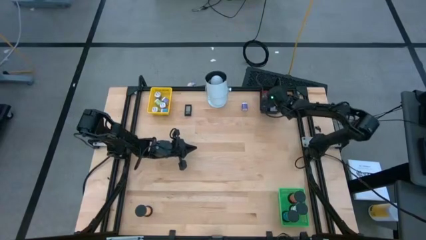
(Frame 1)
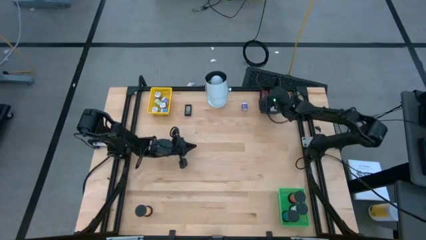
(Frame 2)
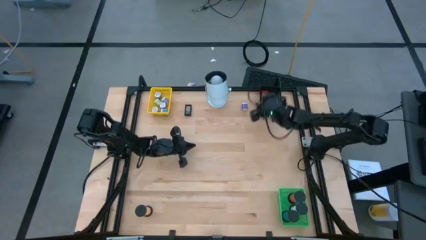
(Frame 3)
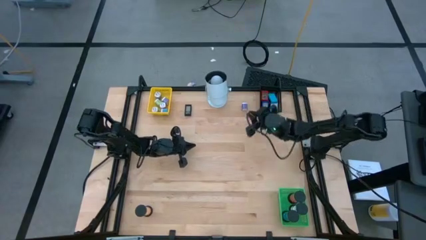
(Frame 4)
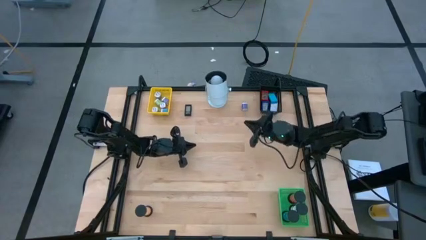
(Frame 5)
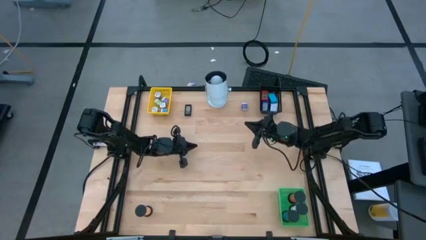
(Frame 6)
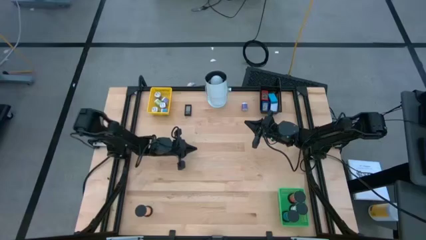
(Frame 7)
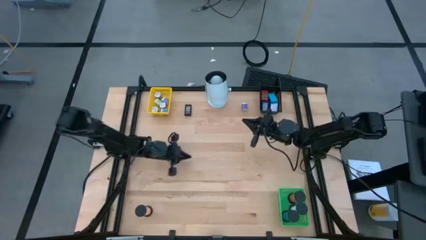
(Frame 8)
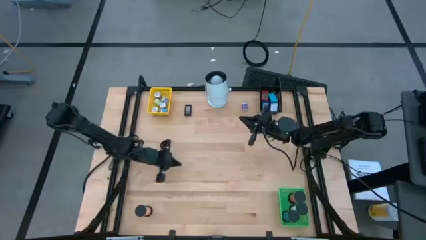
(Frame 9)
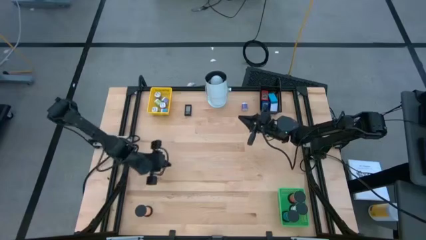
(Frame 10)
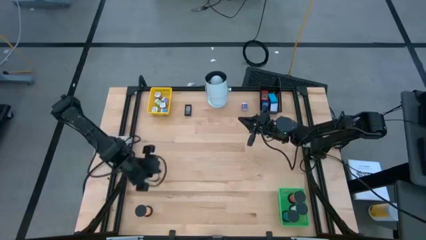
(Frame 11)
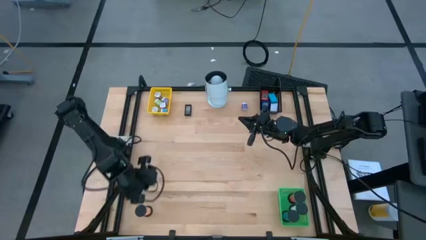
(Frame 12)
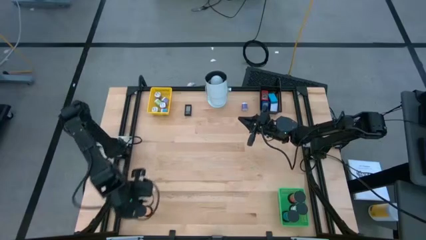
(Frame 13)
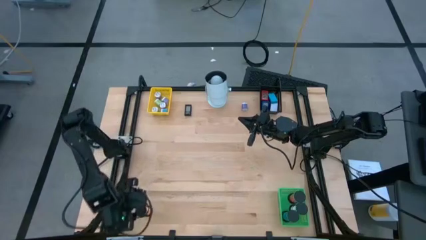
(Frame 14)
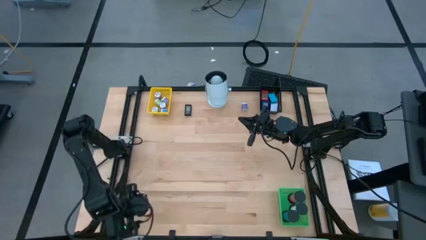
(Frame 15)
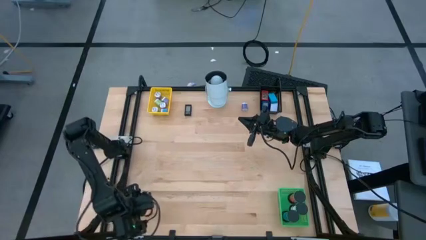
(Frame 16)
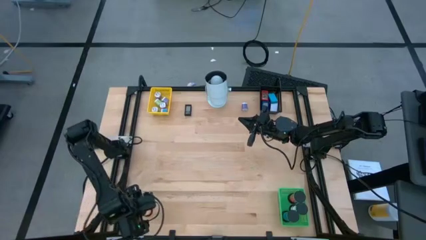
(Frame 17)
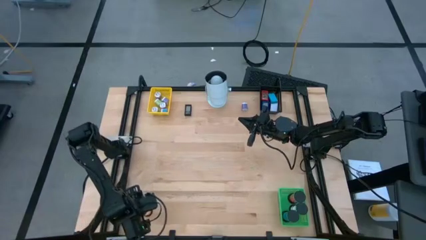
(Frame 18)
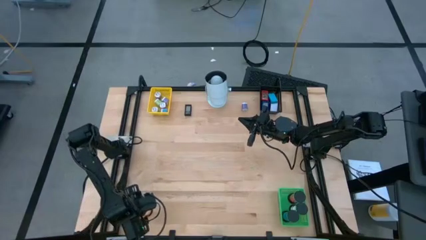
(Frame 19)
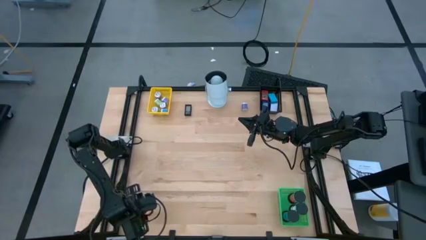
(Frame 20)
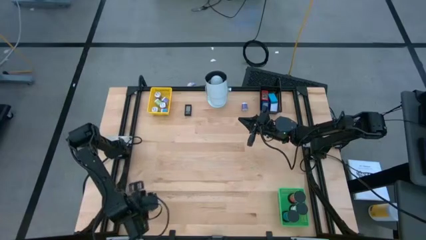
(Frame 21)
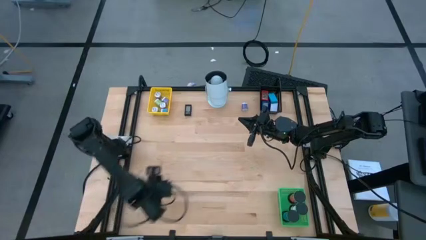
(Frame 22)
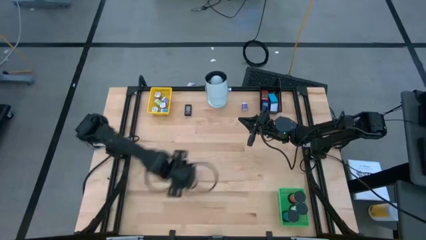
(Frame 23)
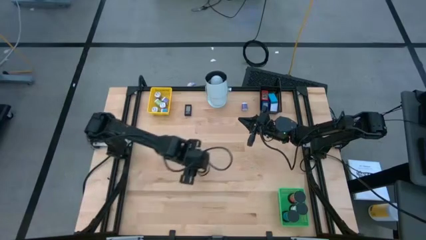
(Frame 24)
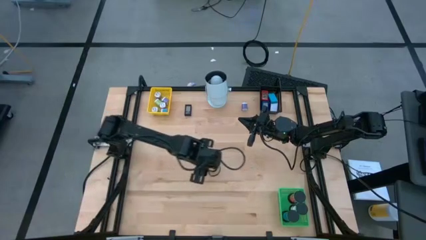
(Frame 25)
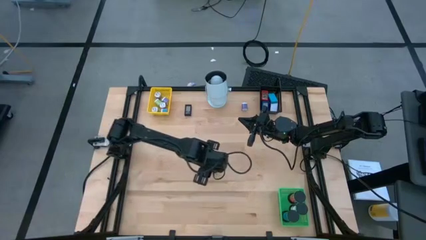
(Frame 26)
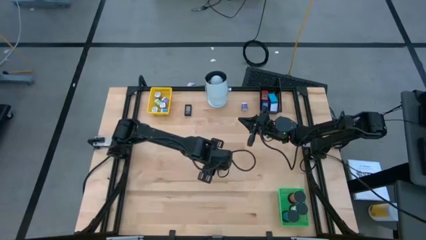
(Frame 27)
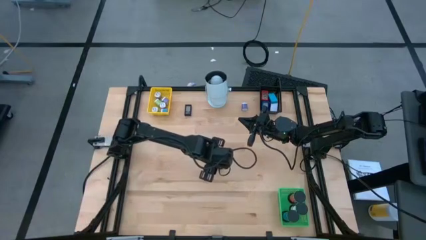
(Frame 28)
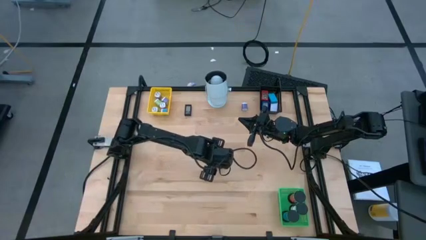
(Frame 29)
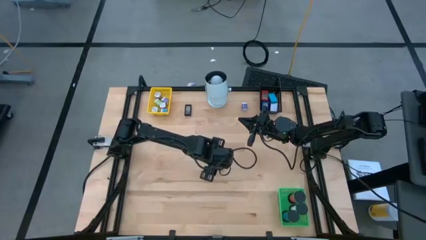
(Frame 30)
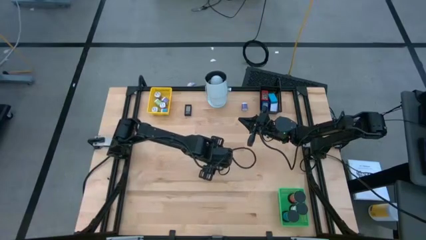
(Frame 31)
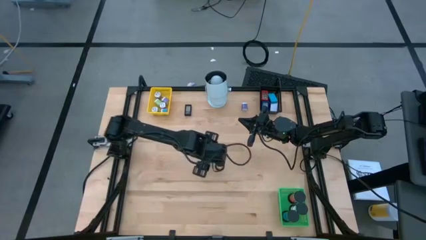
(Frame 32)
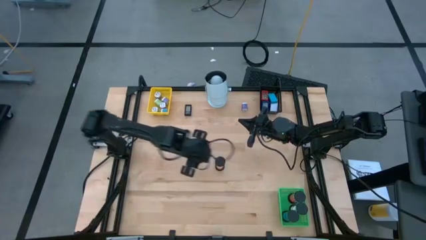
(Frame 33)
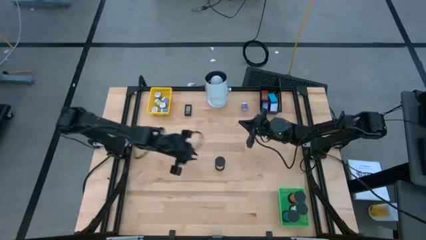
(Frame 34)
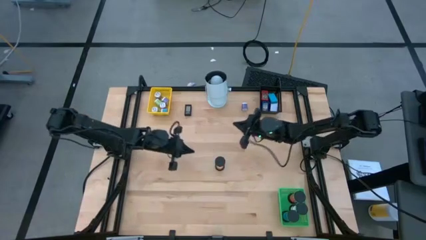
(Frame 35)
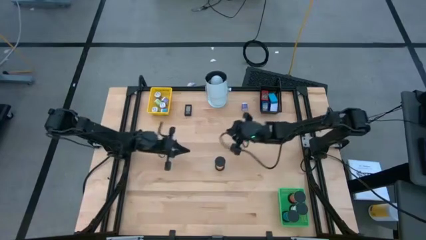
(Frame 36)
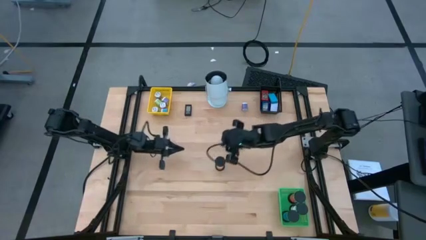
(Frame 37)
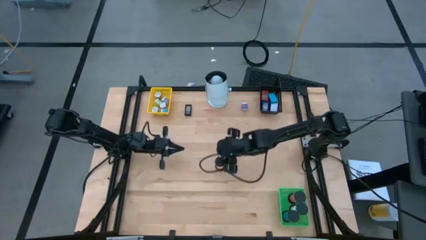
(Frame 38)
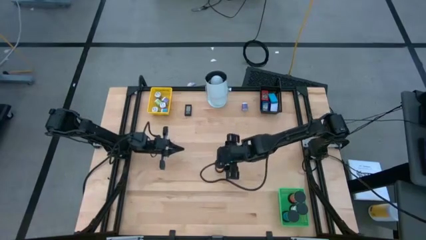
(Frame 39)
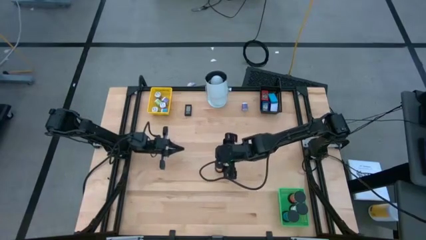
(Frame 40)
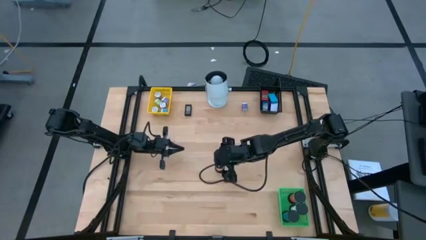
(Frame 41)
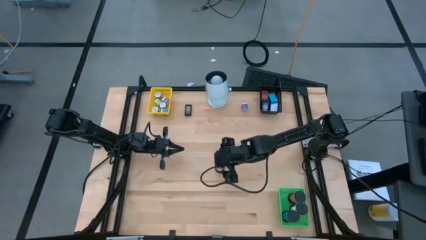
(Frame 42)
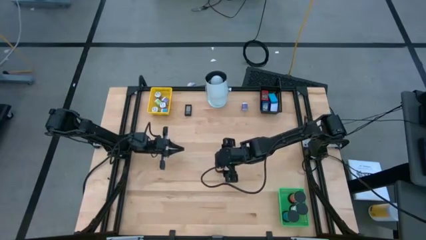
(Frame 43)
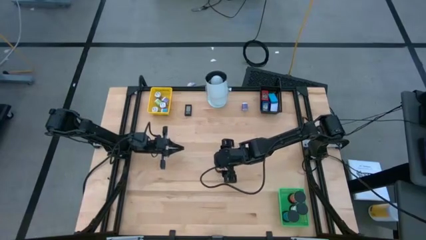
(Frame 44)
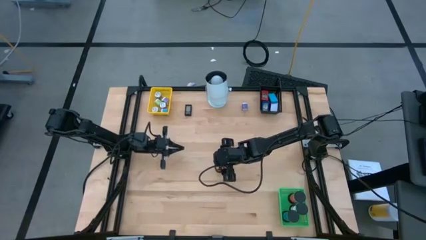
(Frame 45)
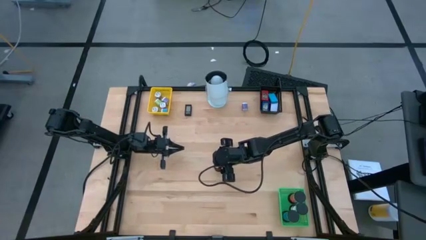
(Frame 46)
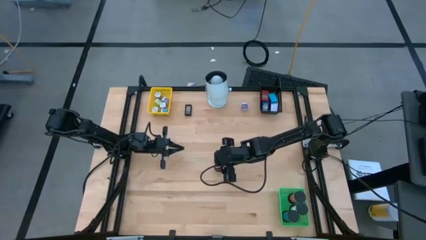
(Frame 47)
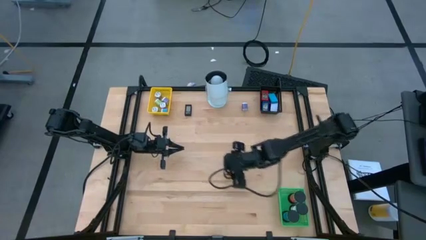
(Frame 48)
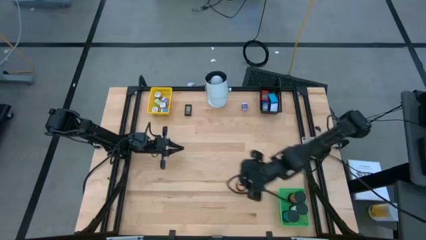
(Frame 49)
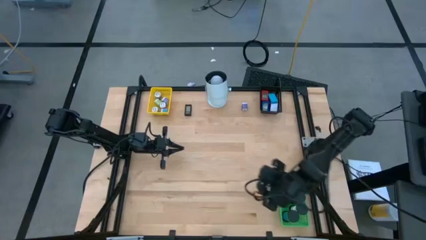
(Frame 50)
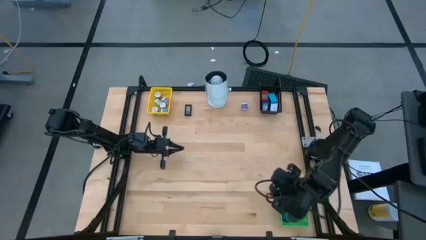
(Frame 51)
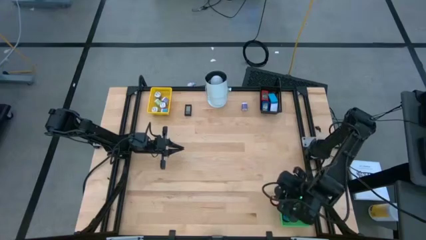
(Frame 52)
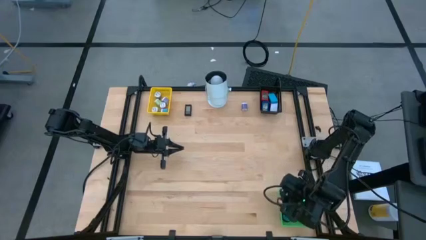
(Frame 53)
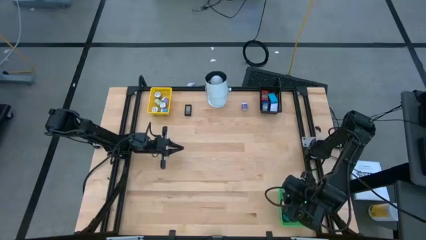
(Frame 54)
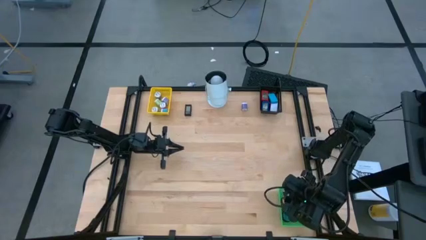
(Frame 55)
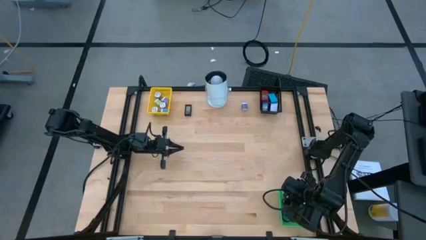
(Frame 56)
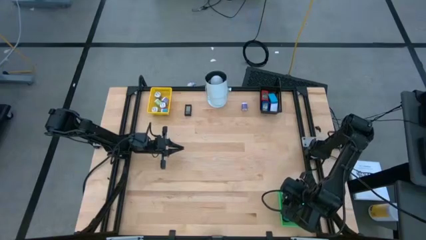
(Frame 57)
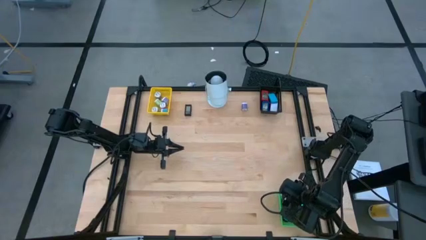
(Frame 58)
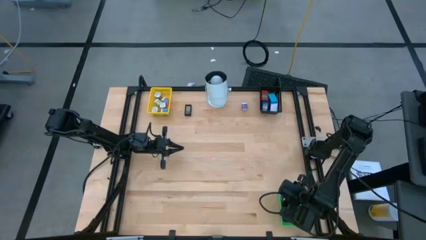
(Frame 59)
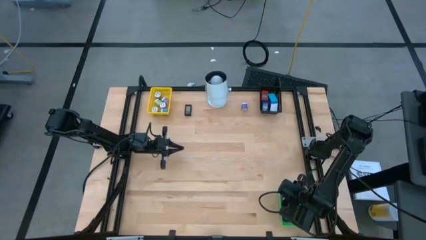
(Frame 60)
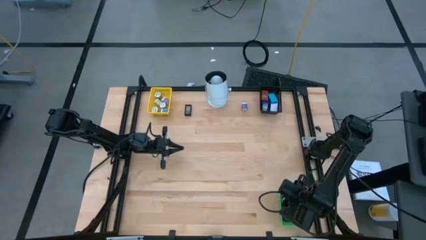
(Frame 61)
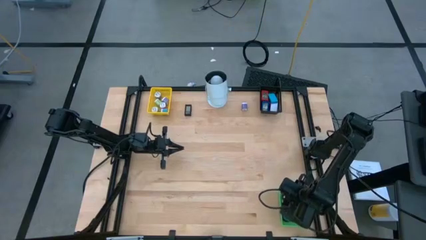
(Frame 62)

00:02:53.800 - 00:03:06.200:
Task: Pick & Place Office items
Put the orange hourglass into the green bin

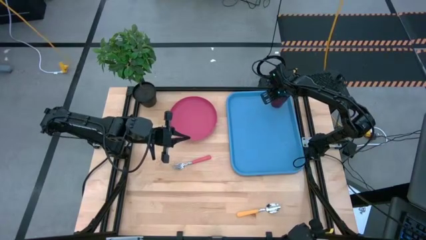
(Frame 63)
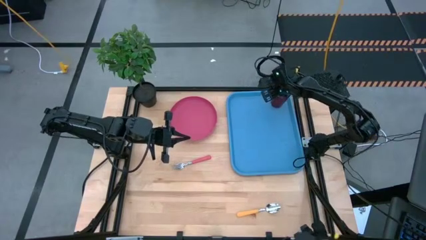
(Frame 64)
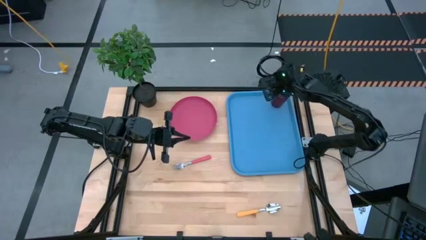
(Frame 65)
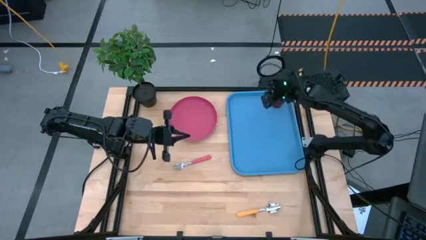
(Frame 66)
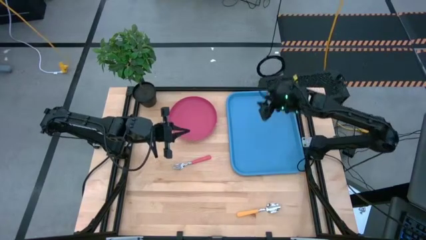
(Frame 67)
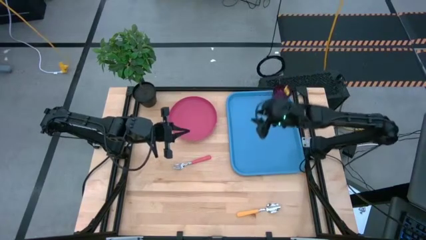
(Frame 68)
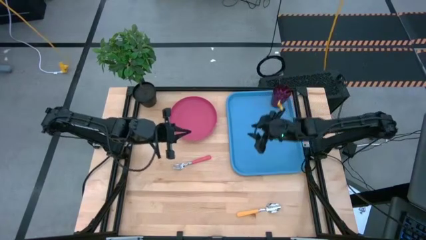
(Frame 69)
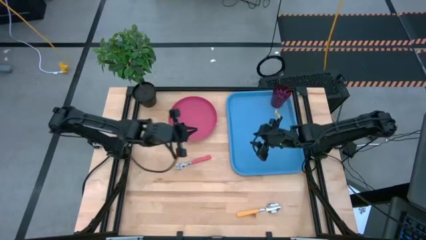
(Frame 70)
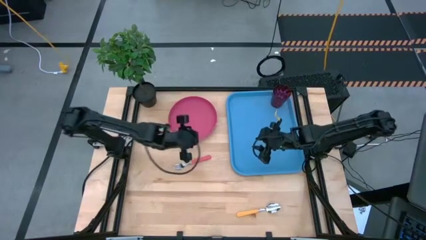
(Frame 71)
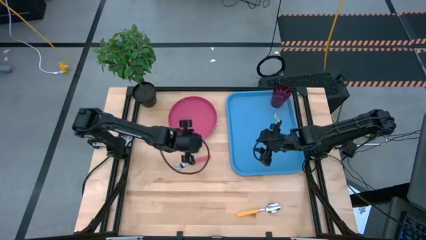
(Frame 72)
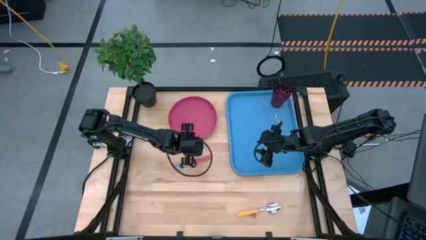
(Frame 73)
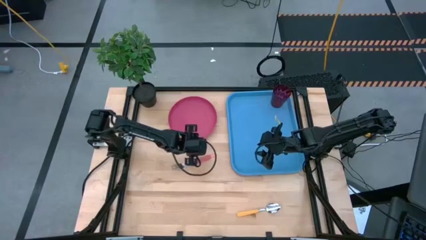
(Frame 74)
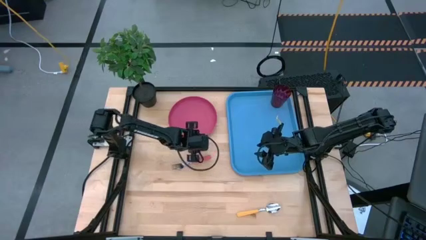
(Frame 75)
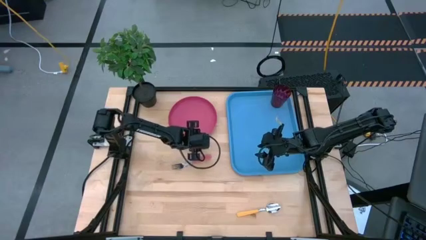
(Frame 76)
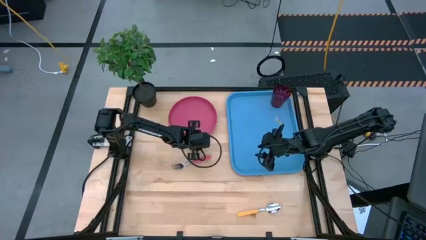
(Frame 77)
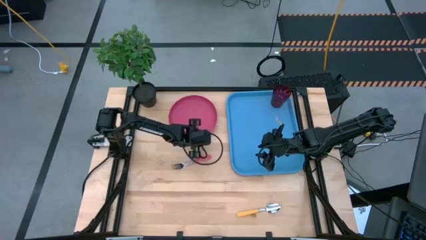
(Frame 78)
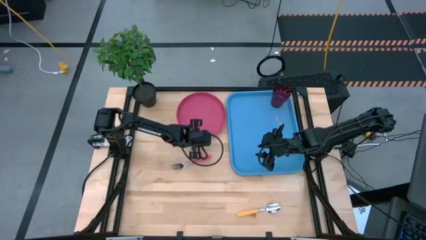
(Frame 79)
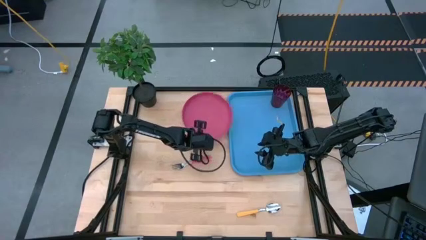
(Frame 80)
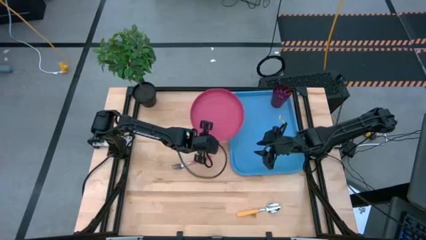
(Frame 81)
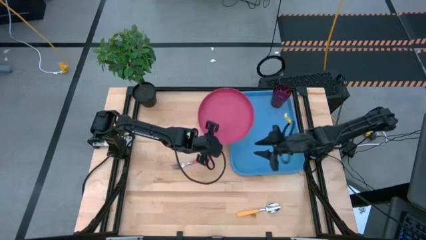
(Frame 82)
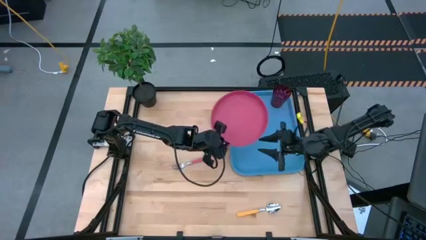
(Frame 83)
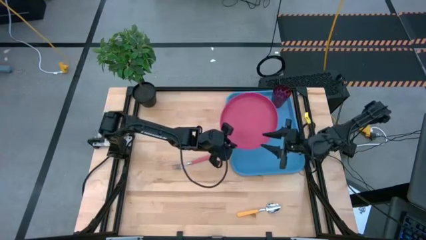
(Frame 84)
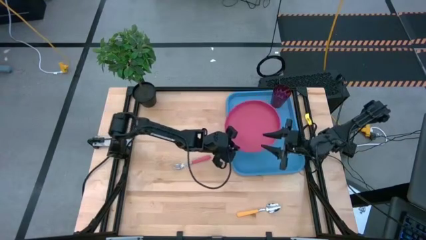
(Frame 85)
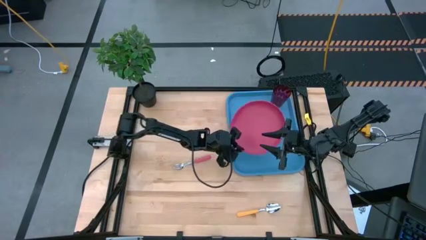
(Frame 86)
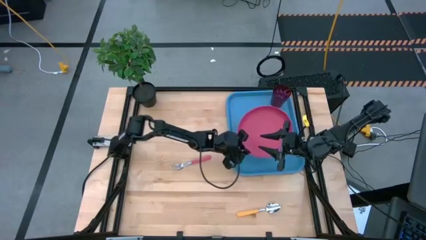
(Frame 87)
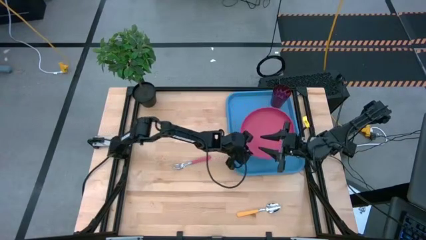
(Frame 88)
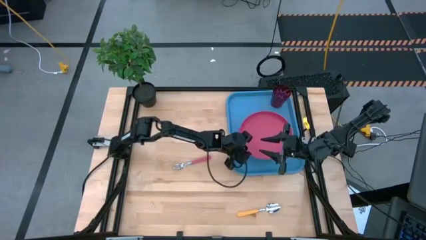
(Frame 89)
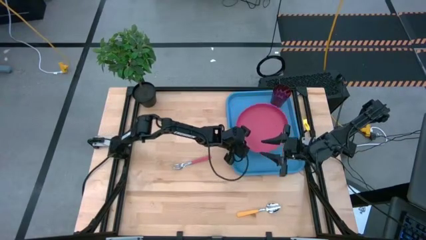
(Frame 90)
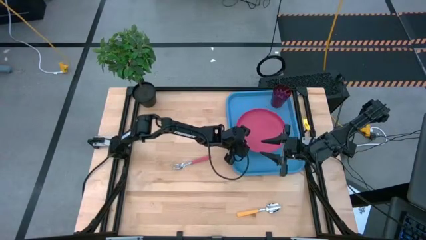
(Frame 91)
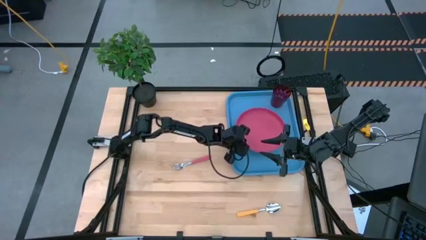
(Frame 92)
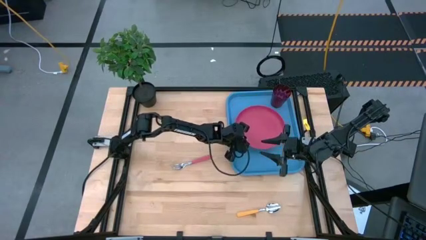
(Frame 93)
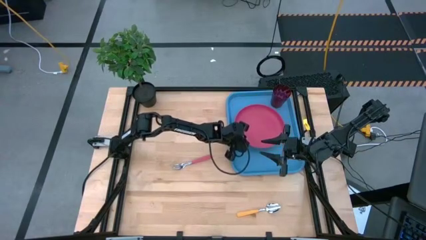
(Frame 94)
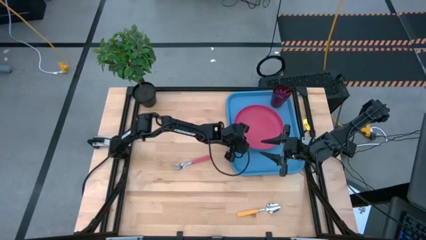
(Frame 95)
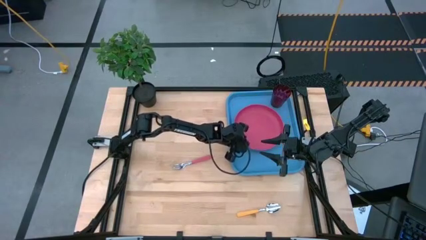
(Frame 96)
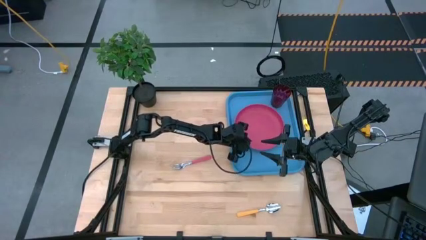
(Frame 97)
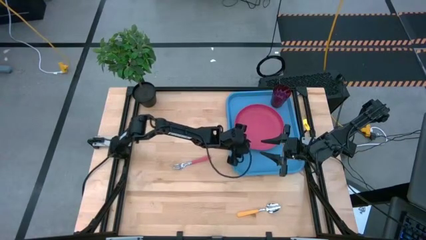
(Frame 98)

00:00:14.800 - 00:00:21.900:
Task: Pick and place plate/cup/fork/spoon on tray
Put the pink plate on the blue tray
